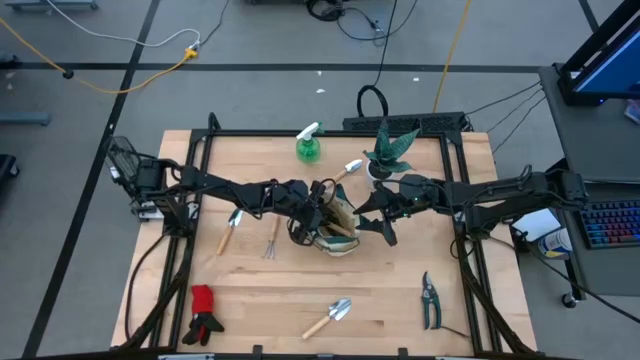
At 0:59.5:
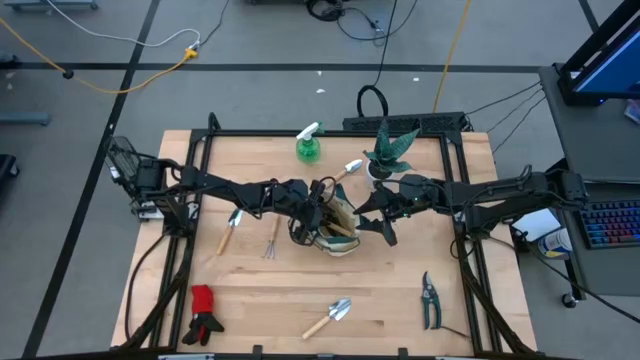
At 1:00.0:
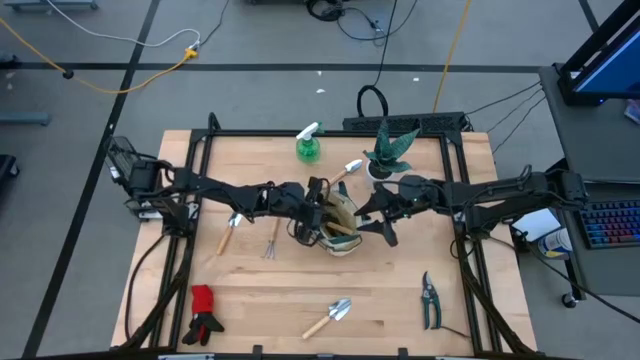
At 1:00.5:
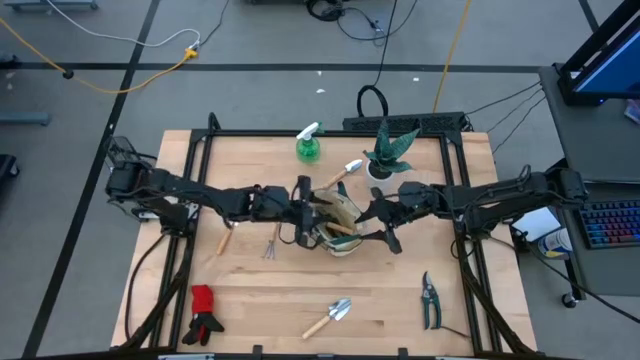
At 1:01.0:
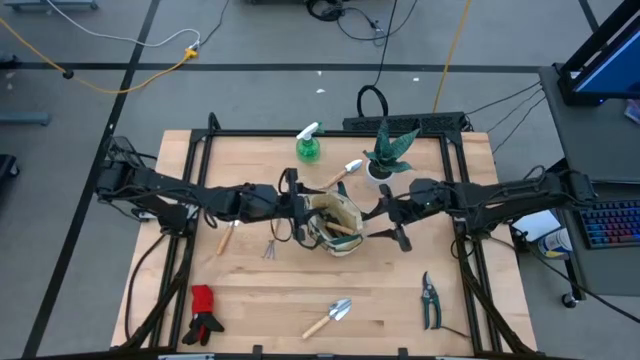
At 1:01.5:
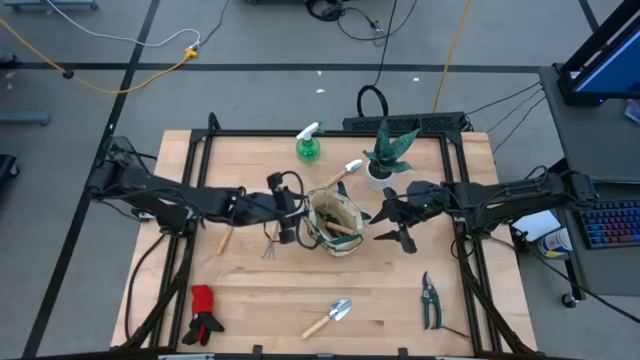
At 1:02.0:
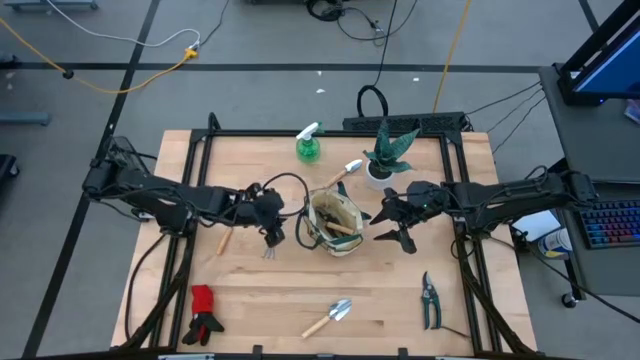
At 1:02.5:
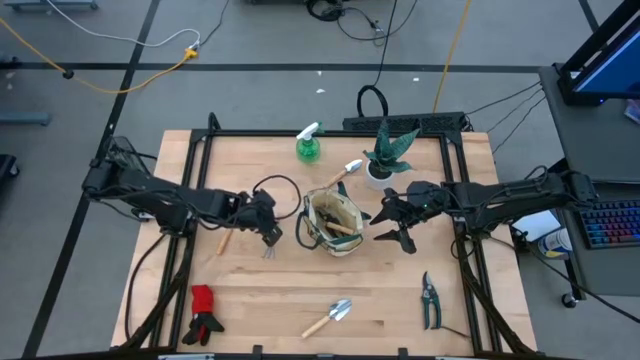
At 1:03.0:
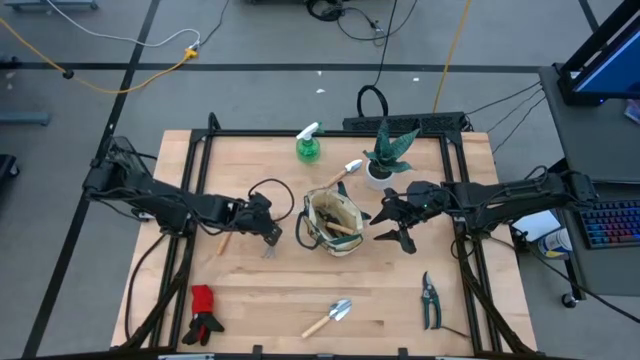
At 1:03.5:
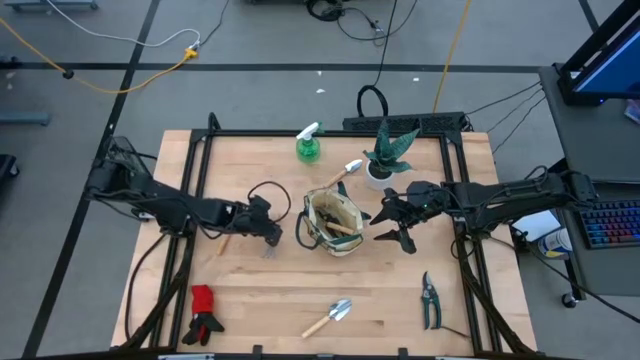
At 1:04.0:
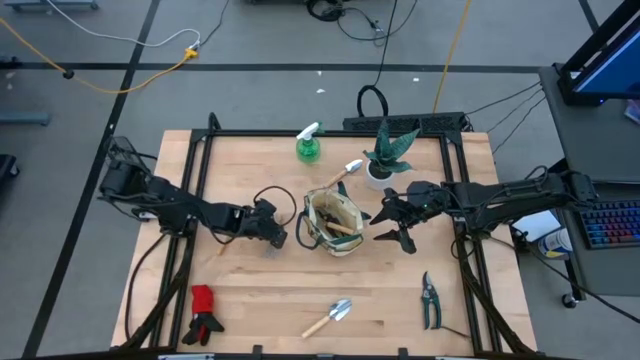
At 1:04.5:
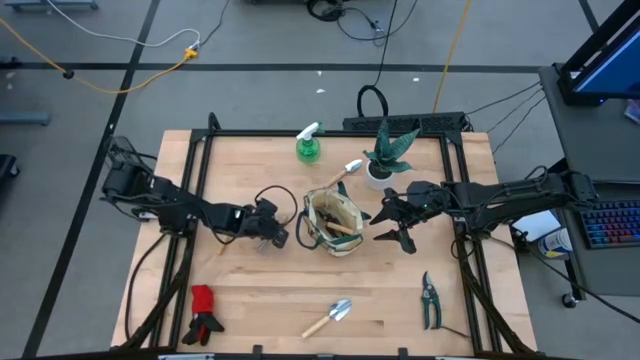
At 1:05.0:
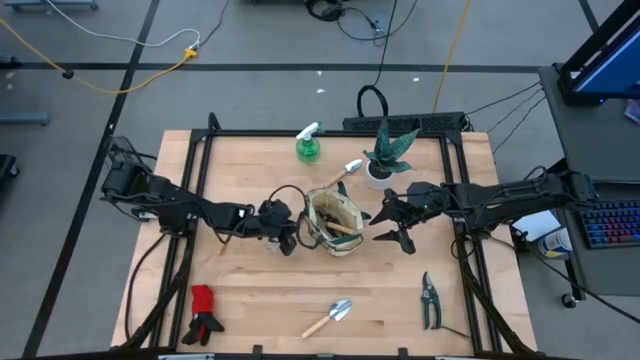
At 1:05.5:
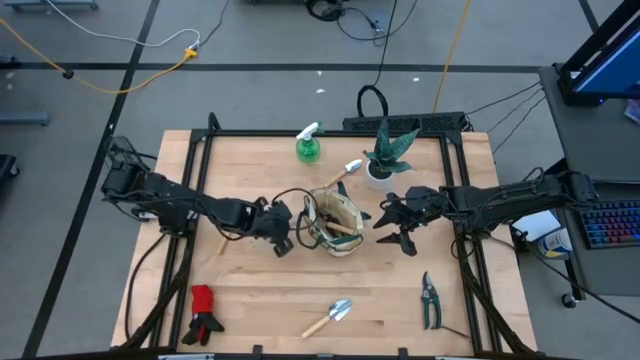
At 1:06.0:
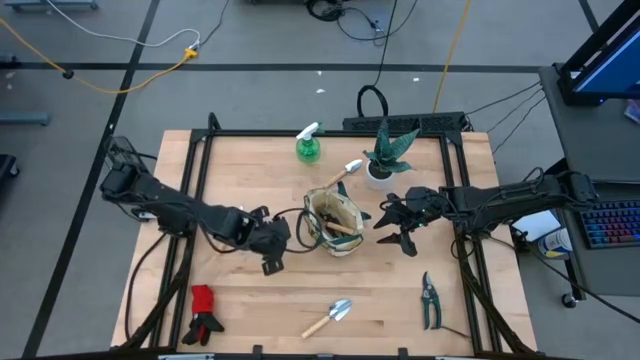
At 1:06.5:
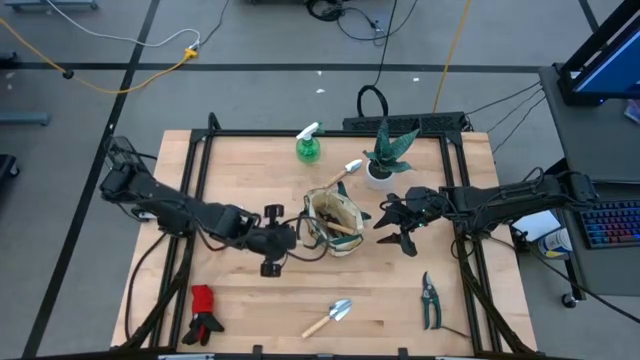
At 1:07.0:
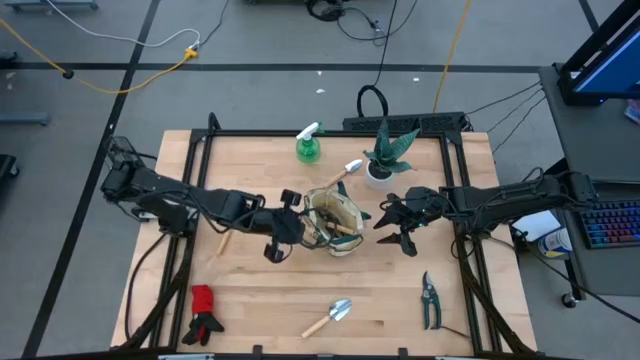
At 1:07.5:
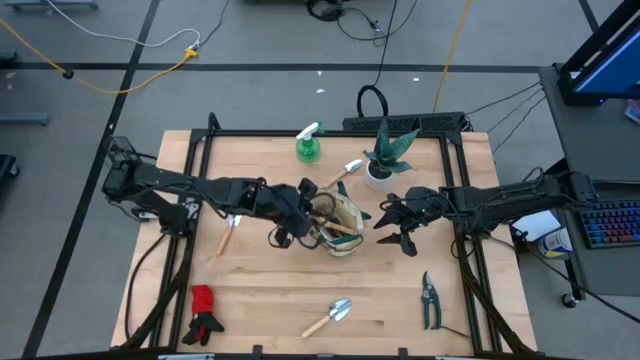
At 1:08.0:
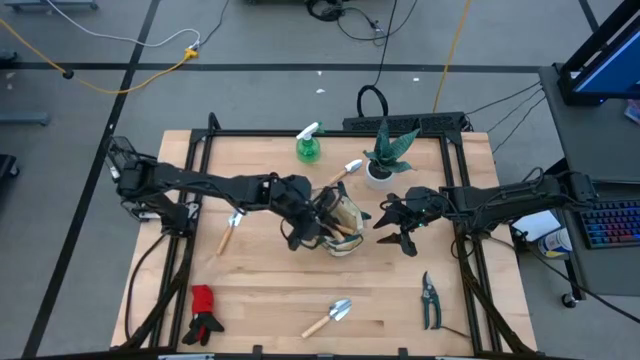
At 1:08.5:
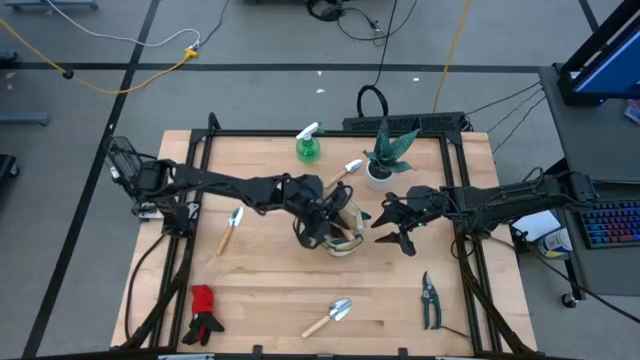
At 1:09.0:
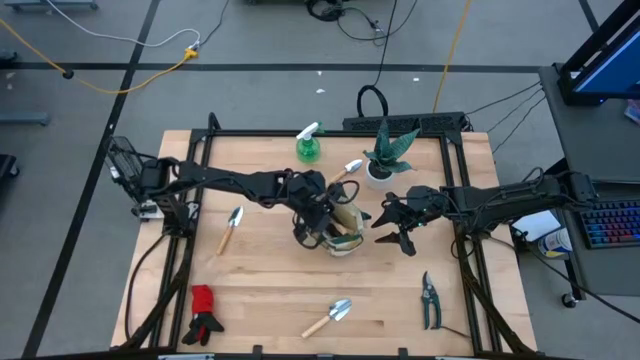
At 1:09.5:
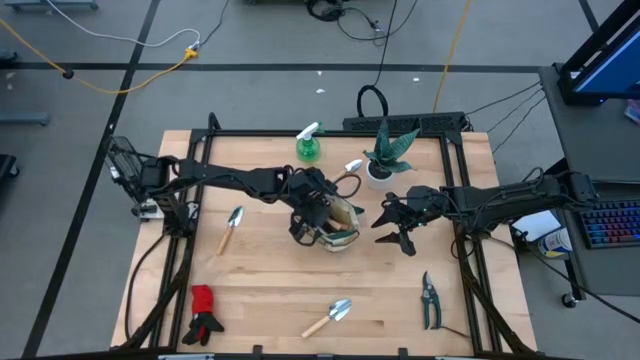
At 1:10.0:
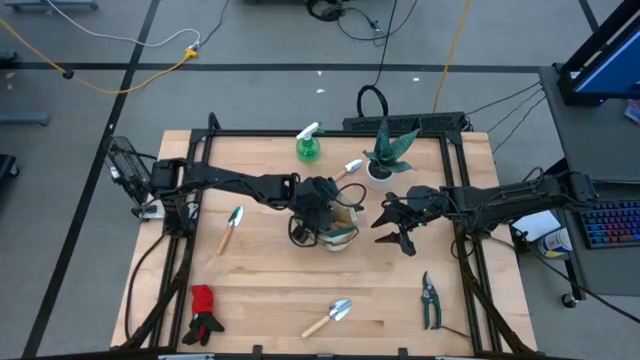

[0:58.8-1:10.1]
Task: Pick & Place Garden tools in Gardening bag
Put the brown hand rake into the gardening bag

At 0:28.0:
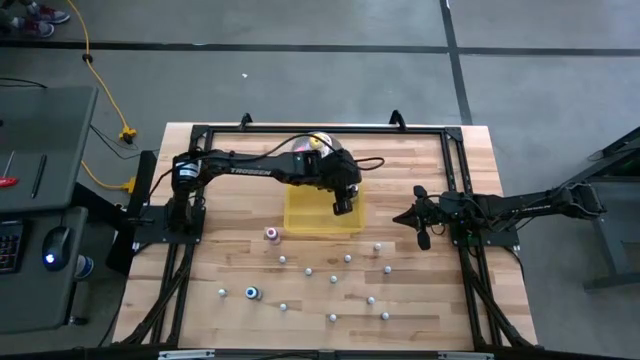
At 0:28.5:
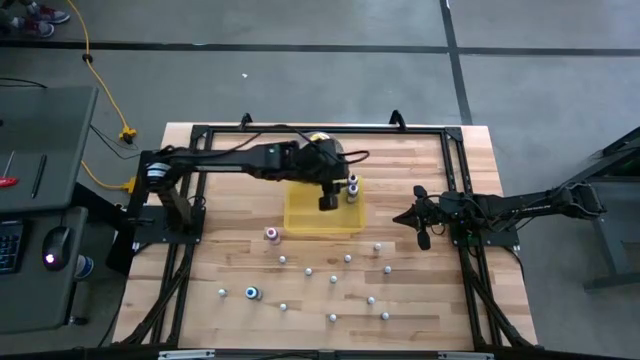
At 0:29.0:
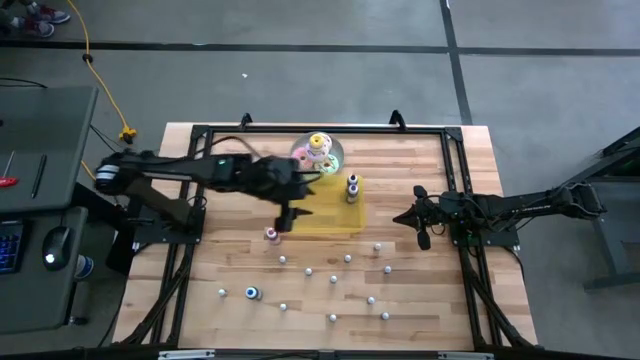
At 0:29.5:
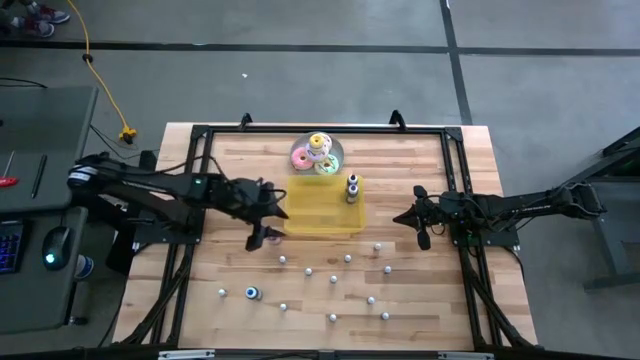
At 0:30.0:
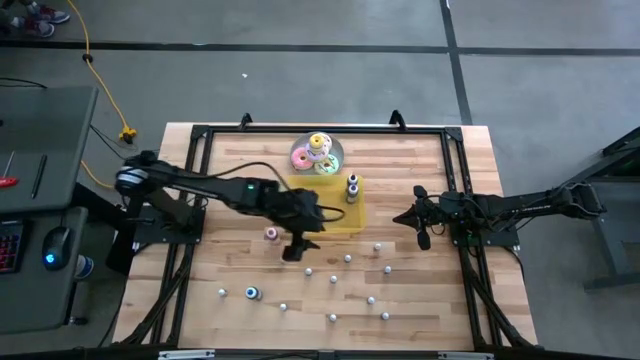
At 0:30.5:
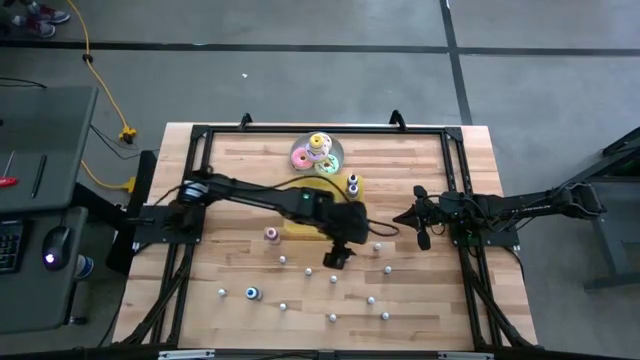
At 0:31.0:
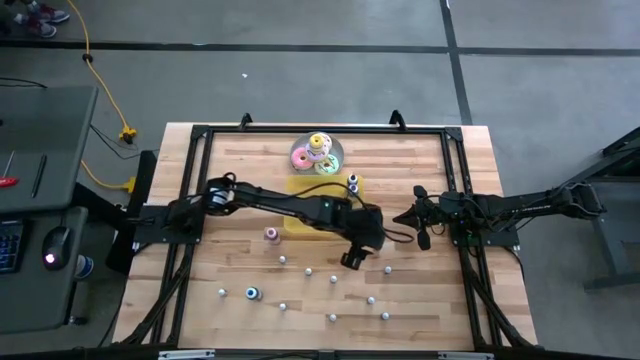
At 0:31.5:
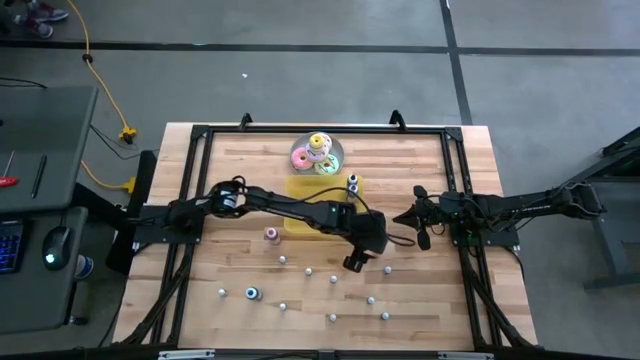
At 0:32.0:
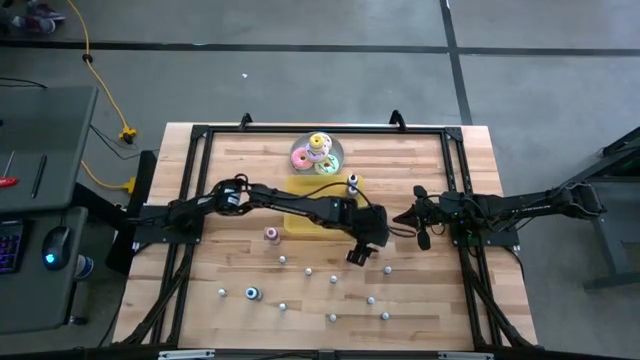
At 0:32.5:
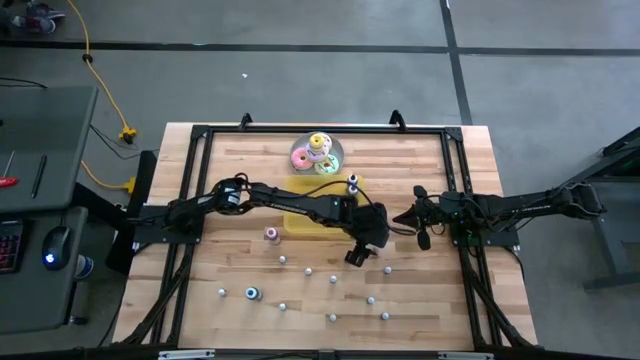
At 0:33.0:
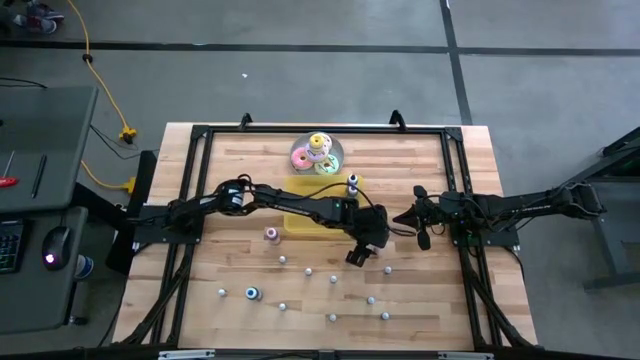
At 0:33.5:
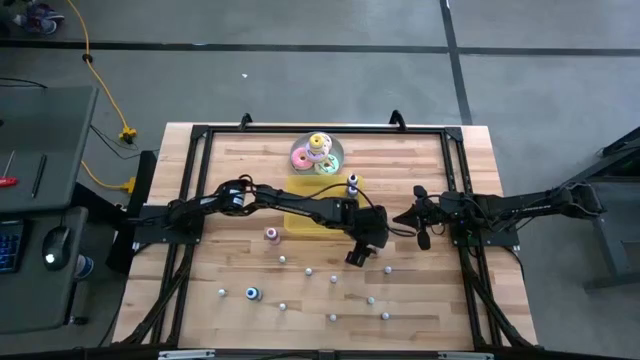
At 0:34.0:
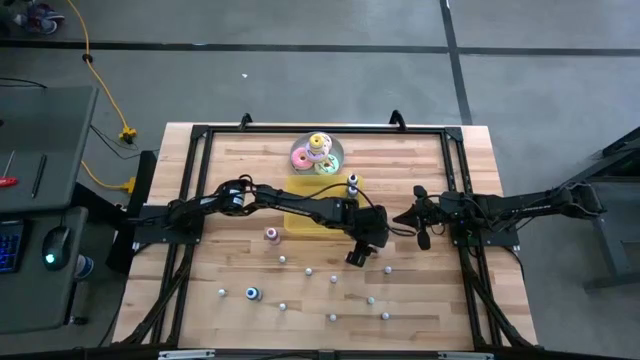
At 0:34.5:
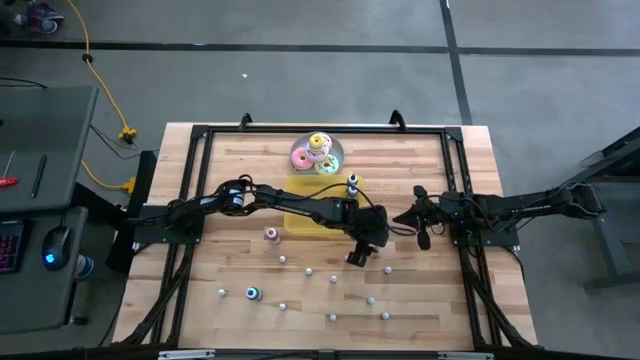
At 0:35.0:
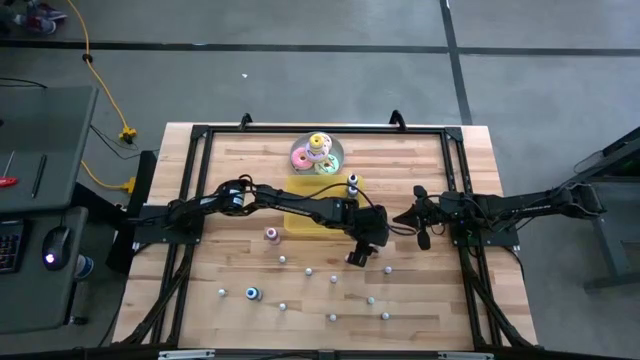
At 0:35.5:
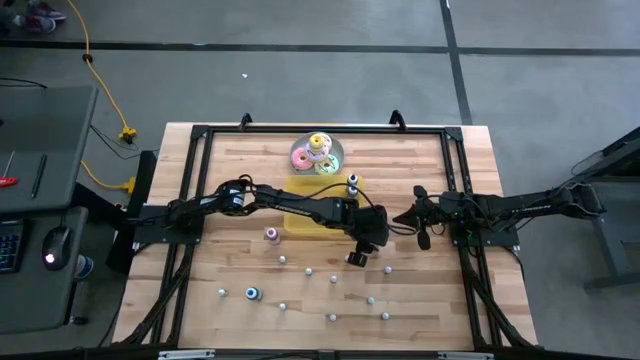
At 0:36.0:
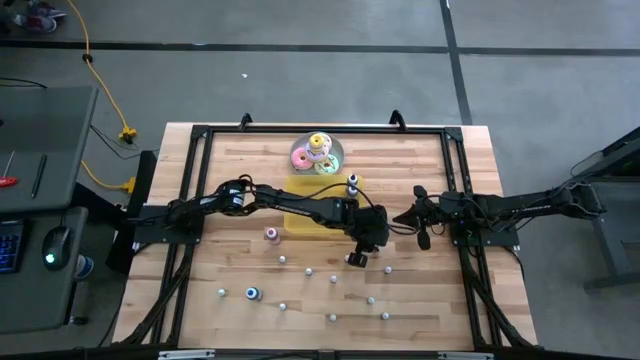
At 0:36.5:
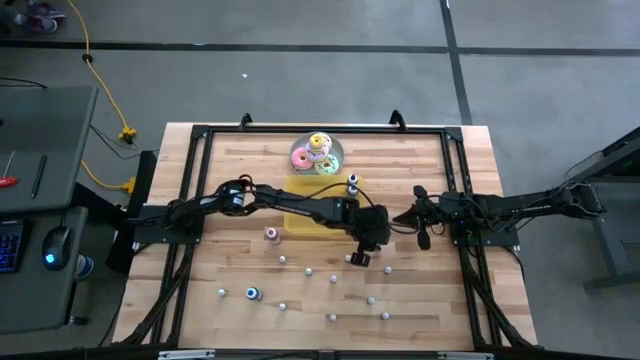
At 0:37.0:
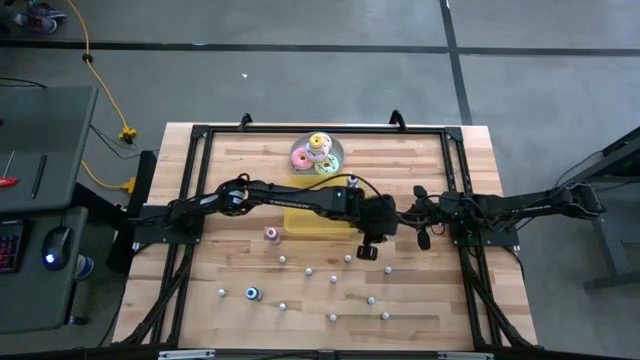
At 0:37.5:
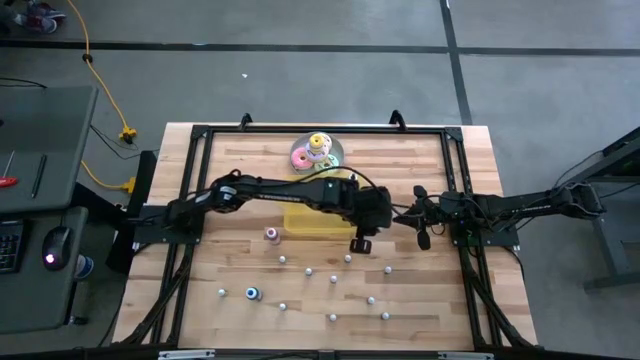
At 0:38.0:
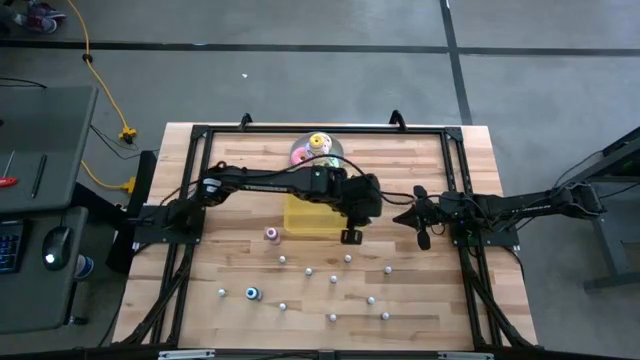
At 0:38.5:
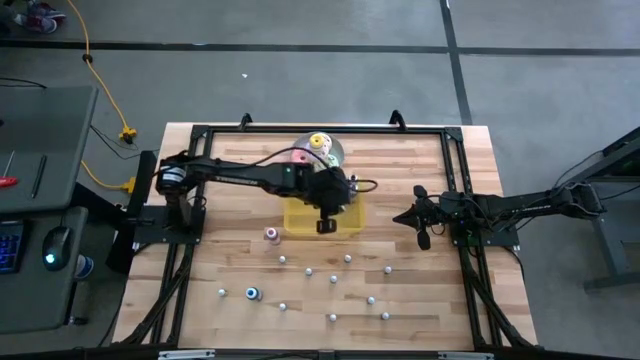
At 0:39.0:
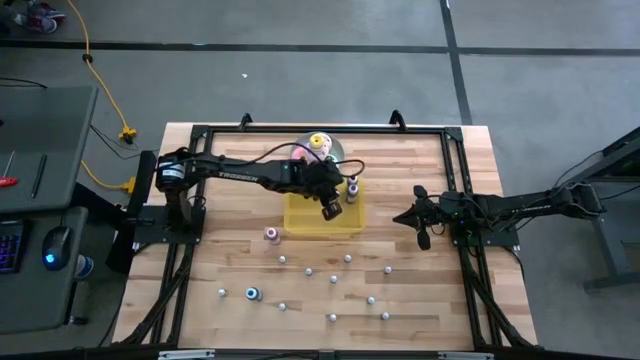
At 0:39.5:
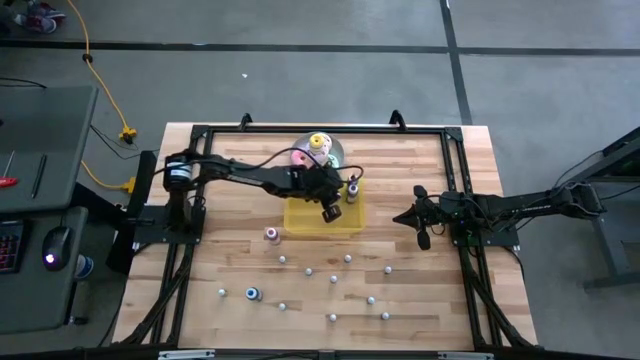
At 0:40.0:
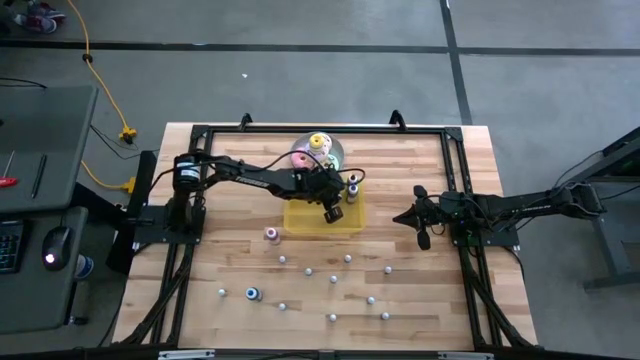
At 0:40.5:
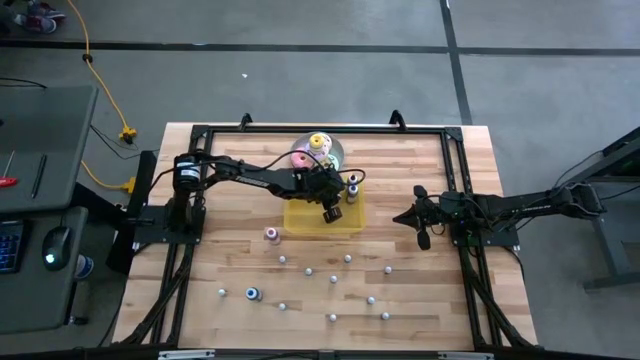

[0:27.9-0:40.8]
Task: Pick & Place food coloring
Put the small orange food coloring bottle into the yellow container
